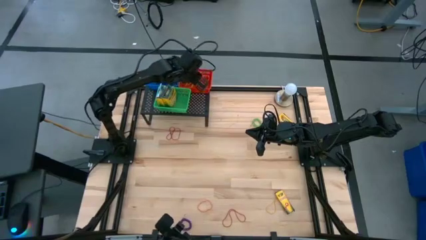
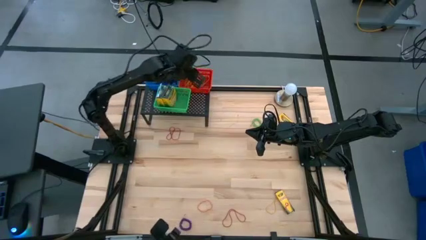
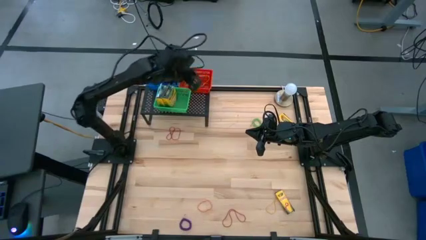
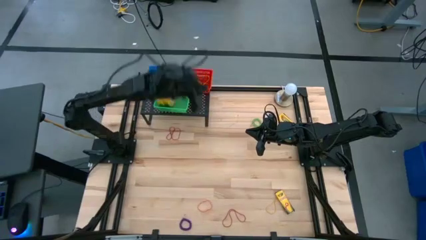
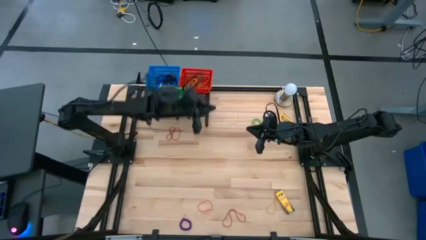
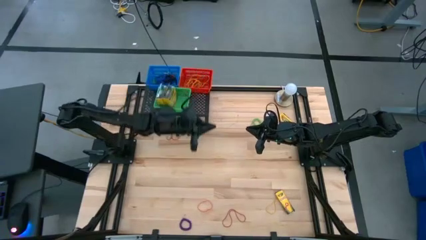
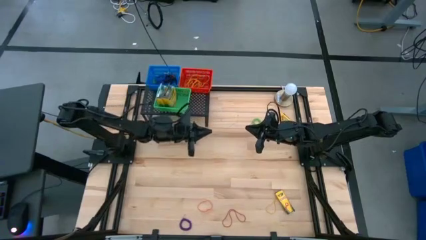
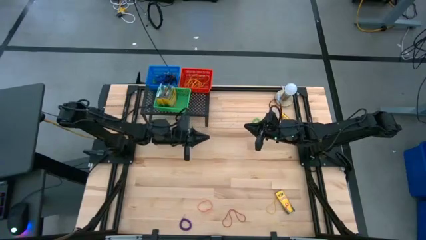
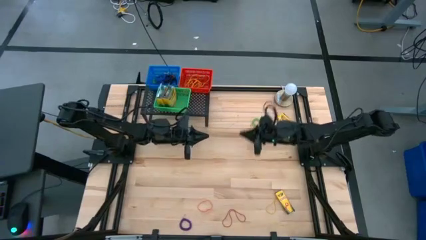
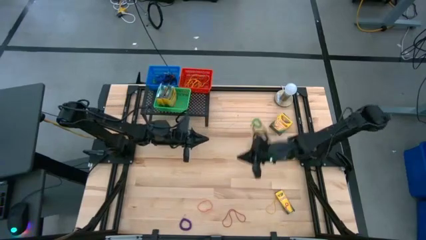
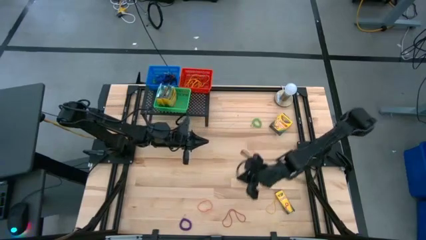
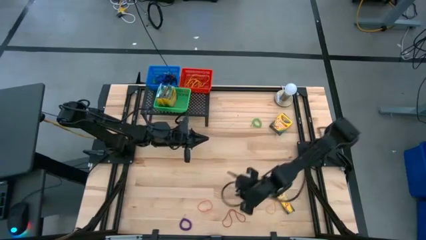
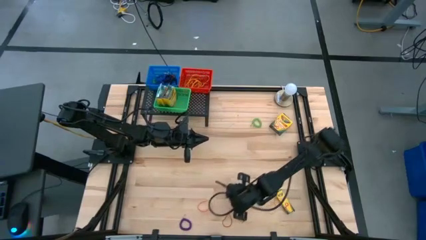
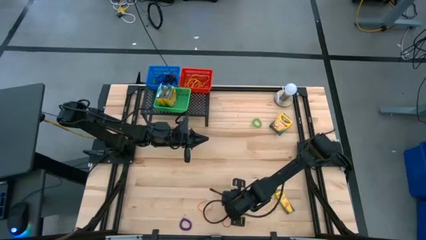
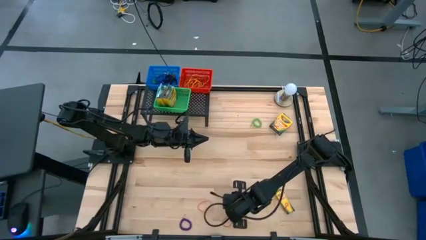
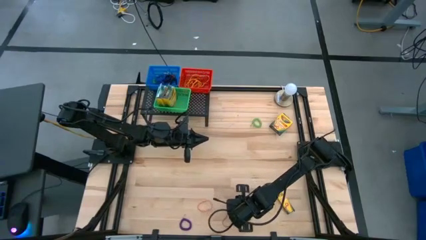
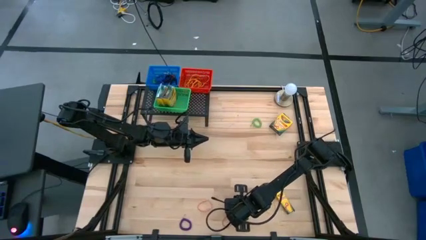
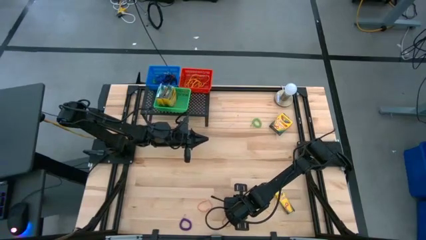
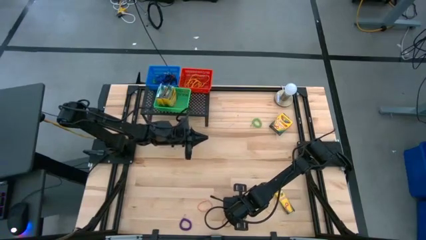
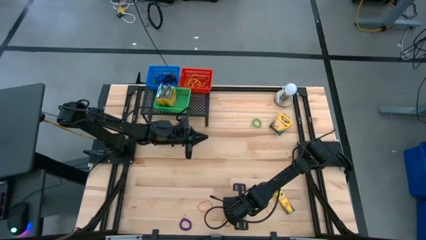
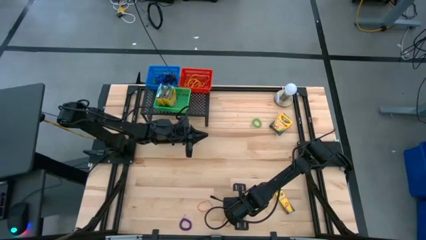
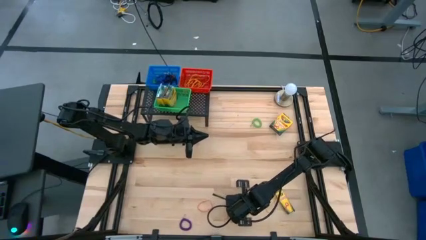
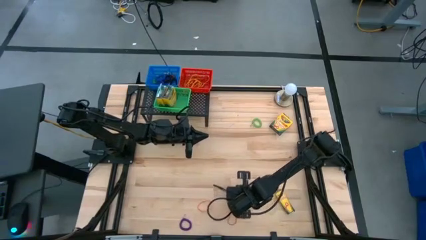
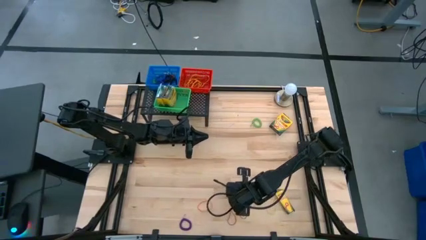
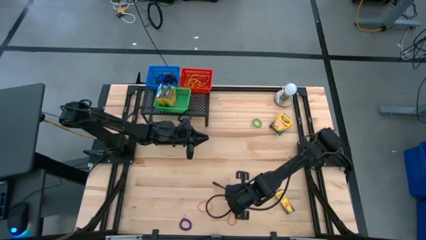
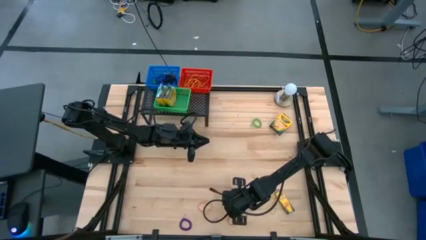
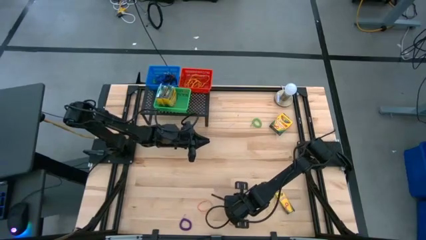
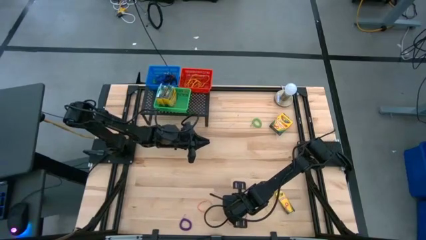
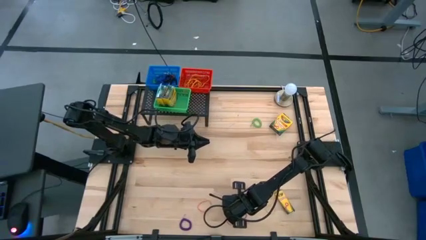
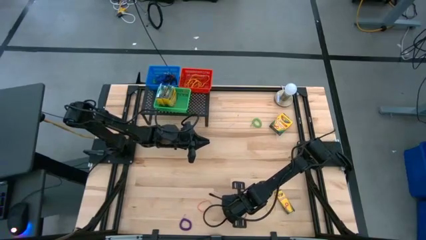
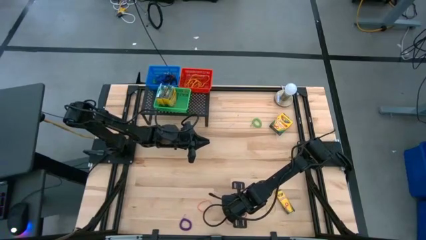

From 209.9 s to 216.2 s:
Task: Pick & Place Office Desk Supplies
Put the red rubber band into the red bin

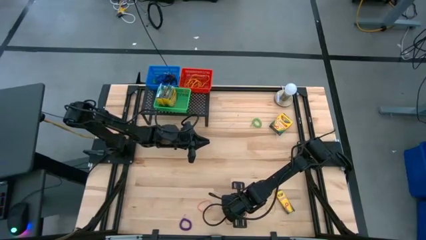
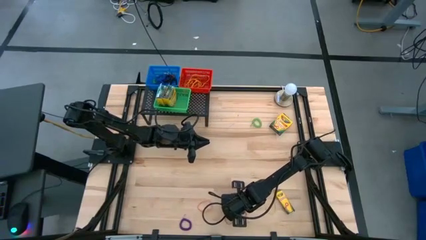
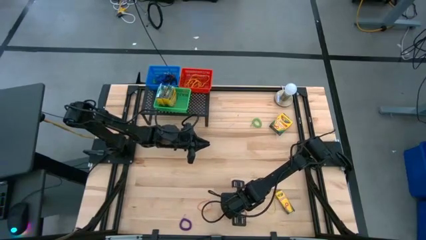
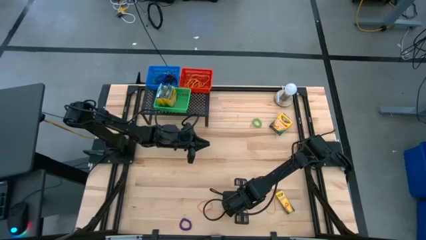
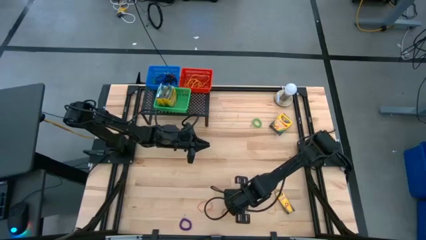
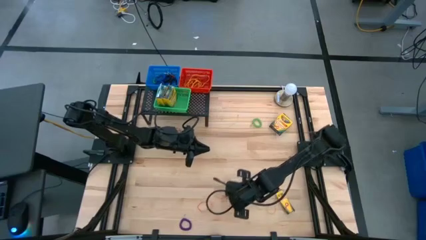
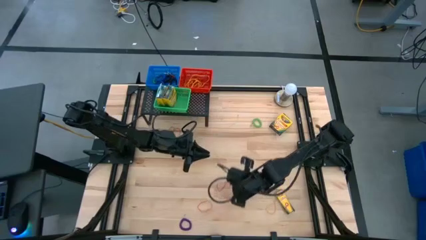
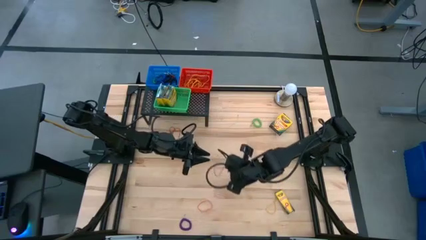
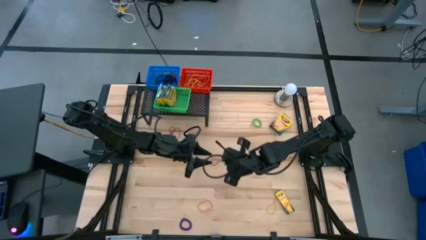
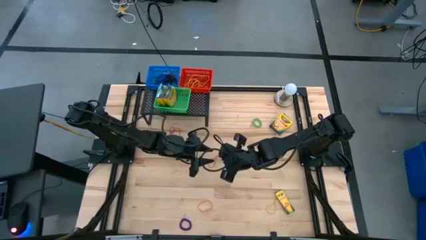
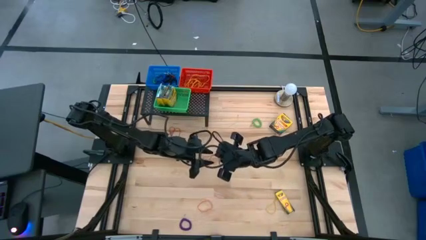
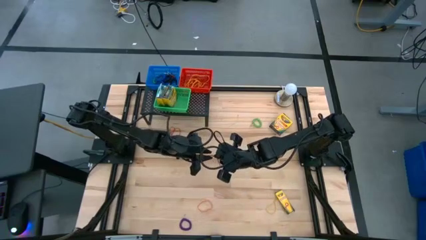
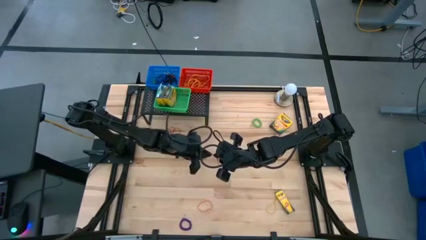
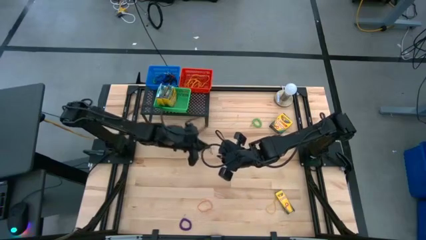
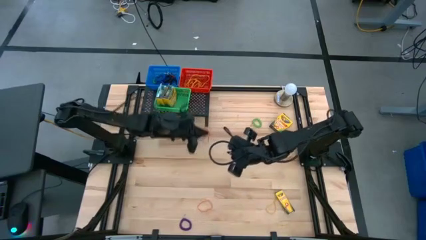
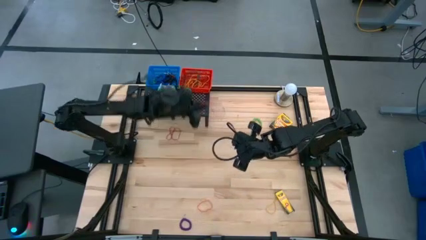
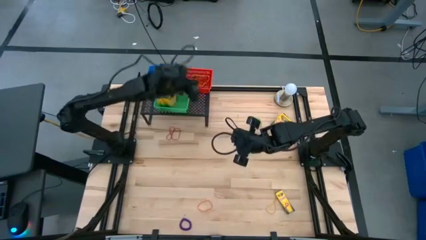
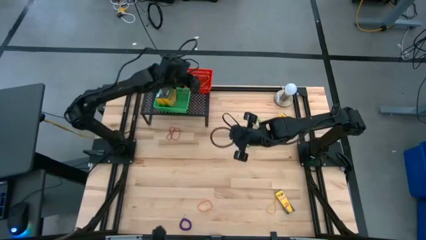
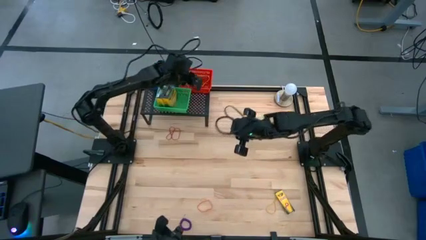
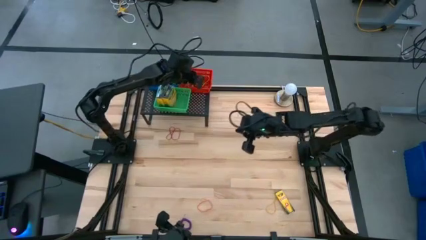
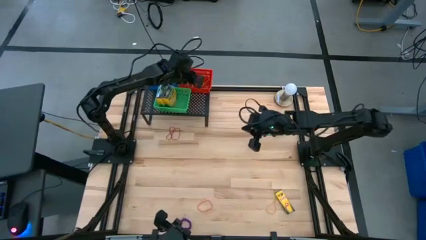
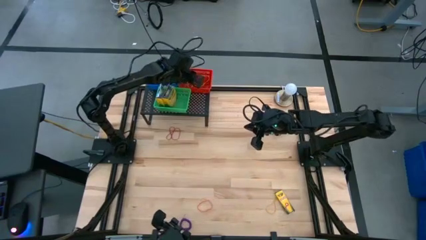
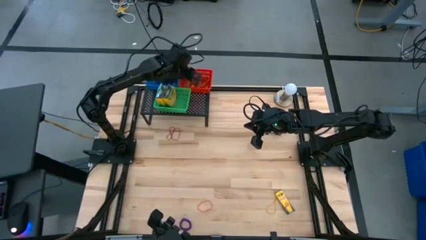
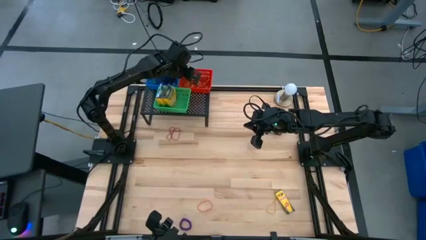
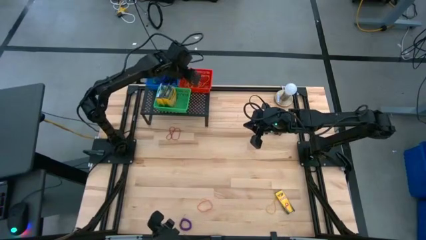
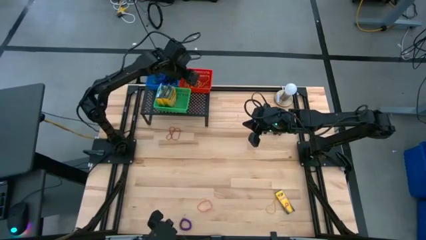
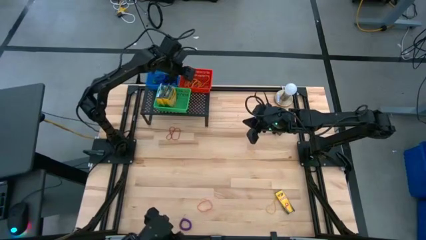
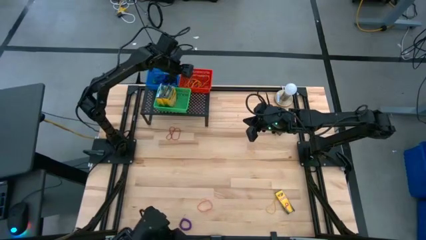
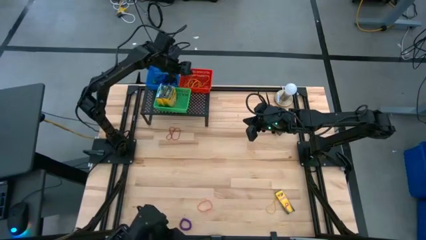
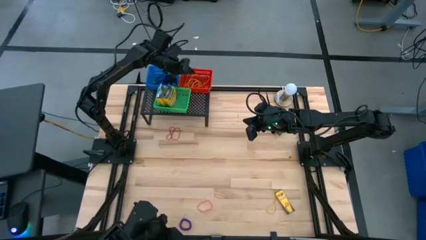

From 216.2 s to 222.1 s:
Put the red rubber band into the red bin

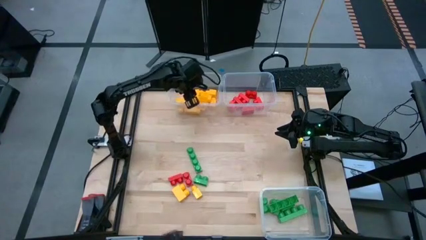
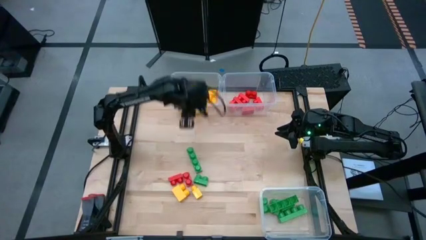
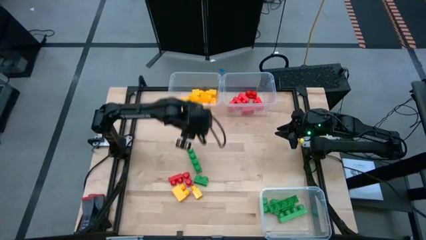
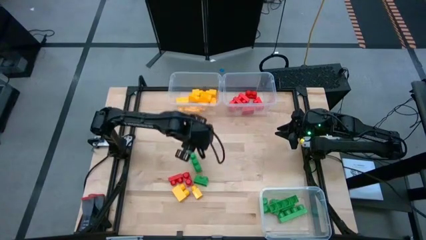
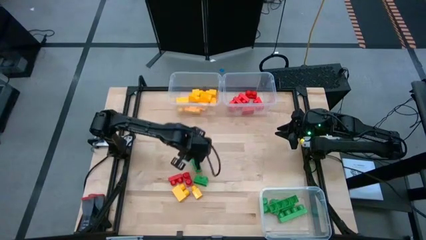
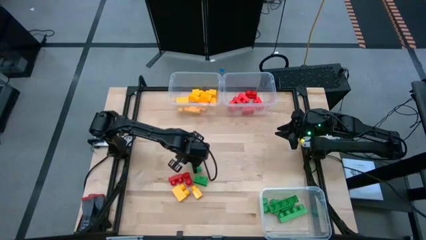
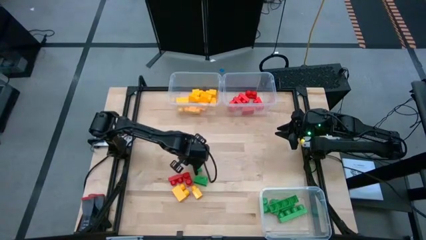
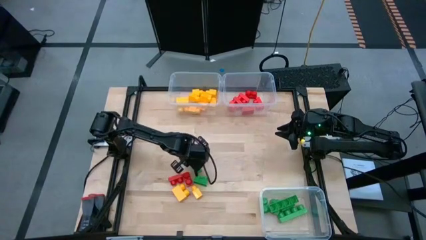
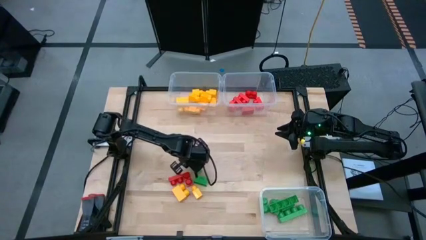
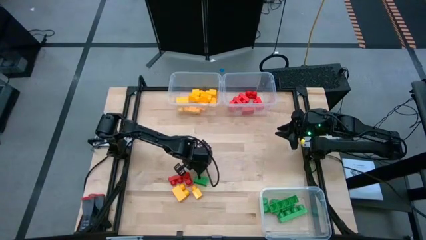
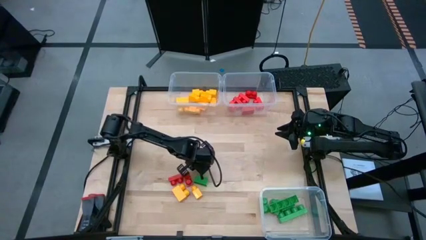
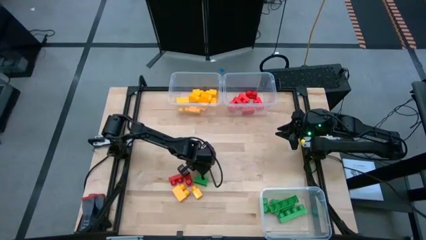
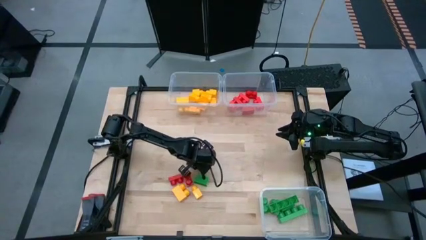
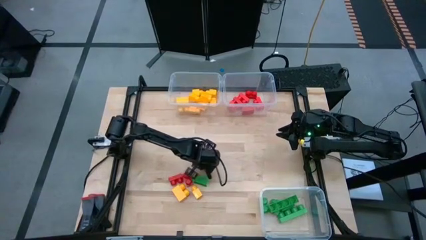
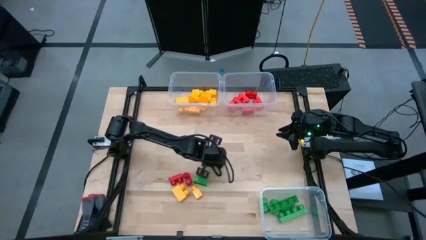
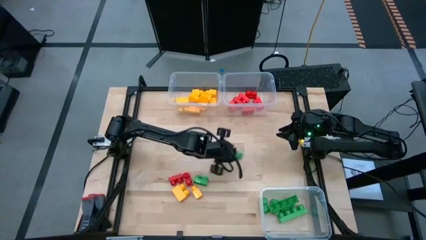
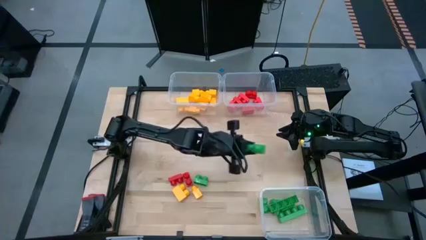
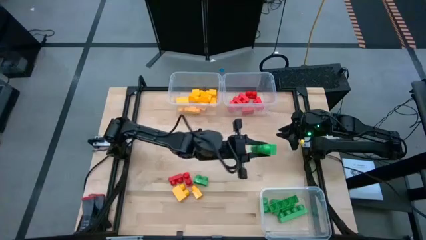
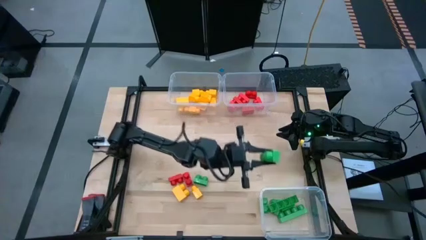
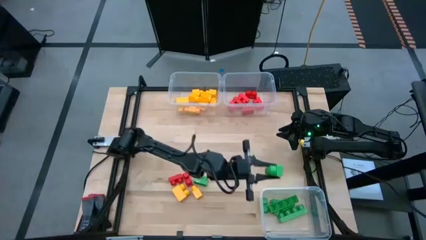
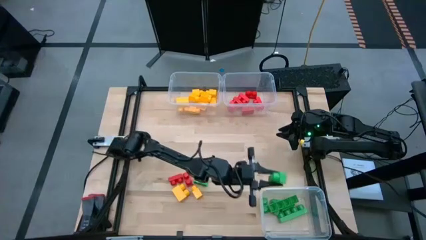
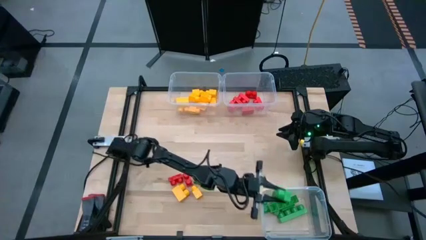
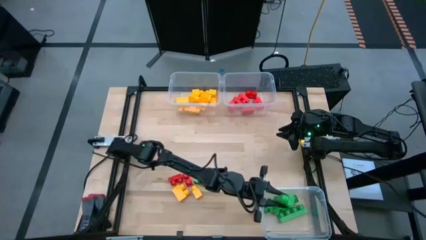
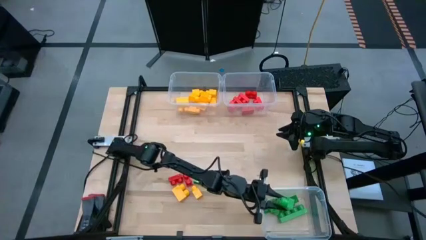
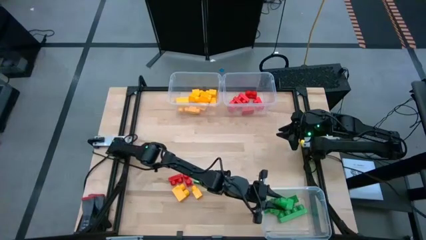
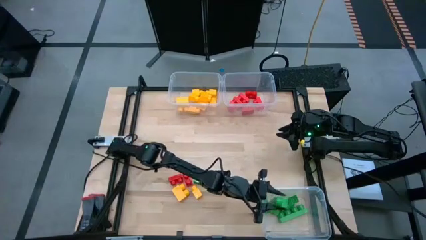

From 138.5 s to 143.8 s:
Task: Sort blocks
Put the green game piece into the bottom right transparent bin
